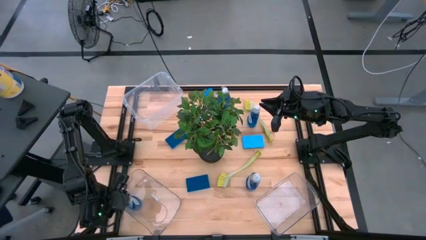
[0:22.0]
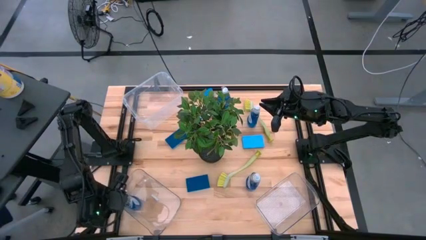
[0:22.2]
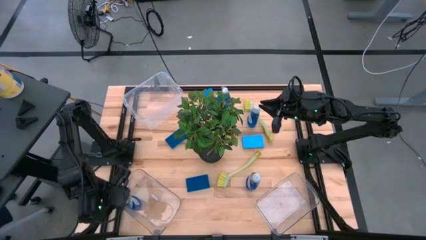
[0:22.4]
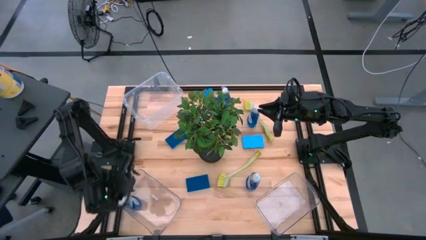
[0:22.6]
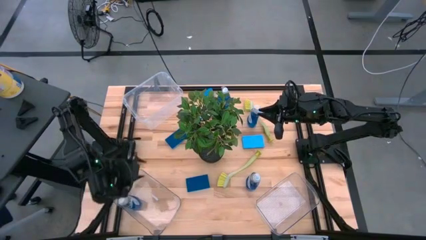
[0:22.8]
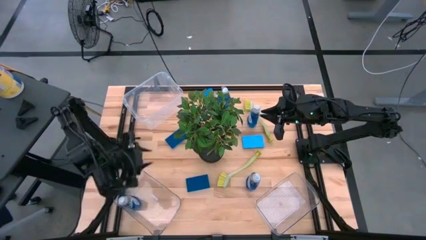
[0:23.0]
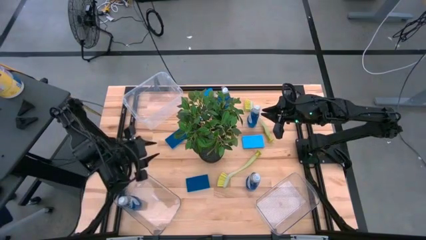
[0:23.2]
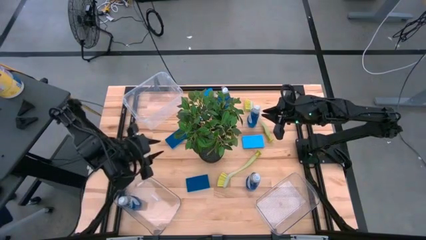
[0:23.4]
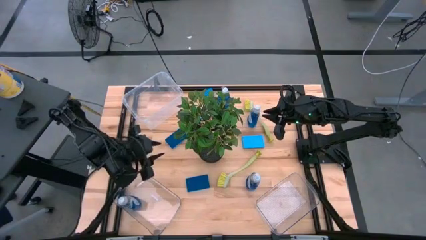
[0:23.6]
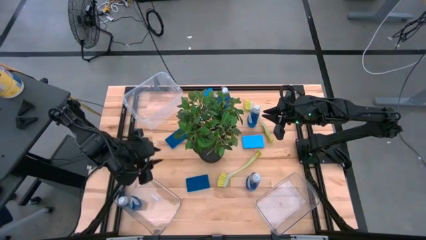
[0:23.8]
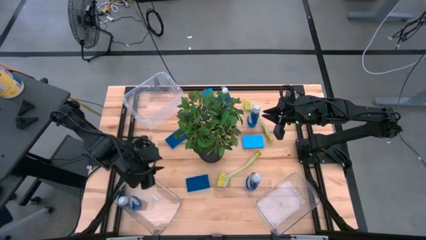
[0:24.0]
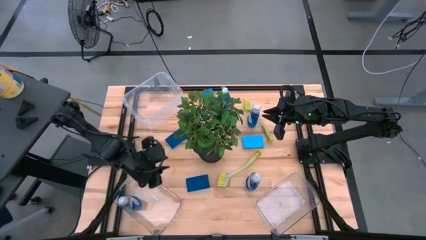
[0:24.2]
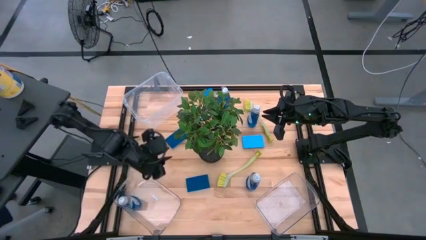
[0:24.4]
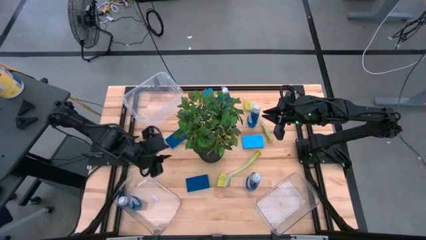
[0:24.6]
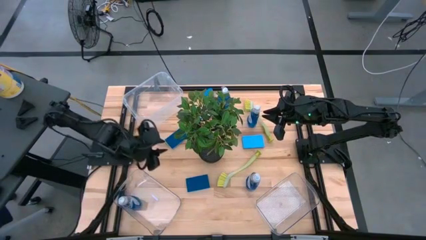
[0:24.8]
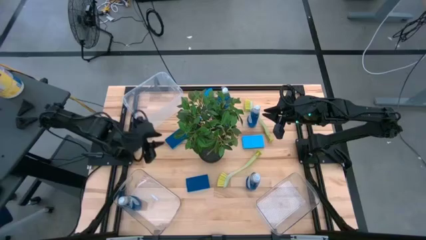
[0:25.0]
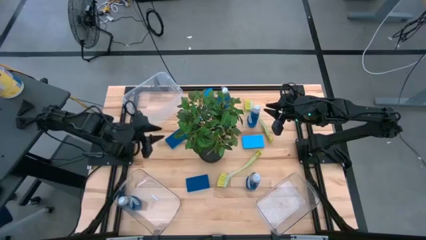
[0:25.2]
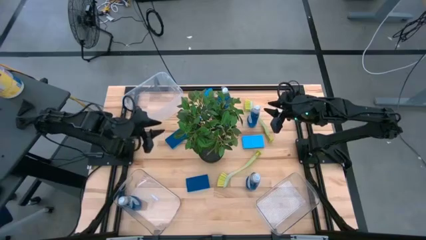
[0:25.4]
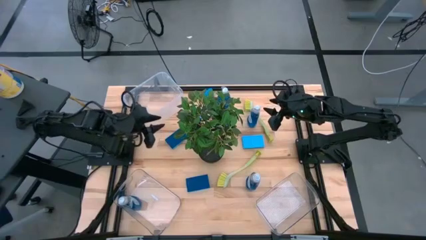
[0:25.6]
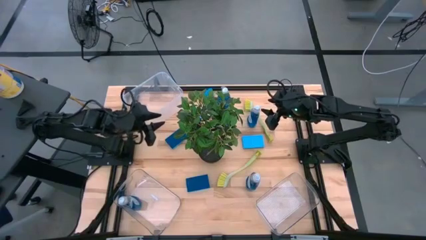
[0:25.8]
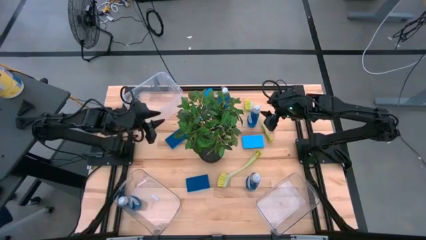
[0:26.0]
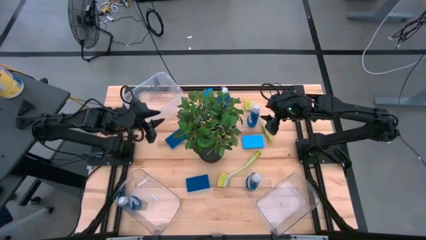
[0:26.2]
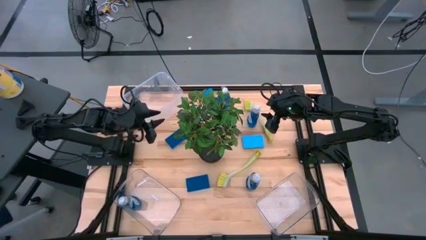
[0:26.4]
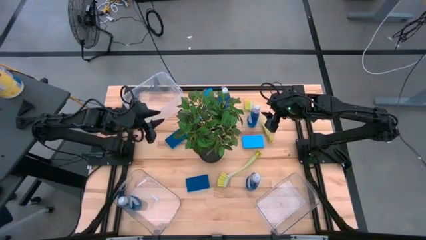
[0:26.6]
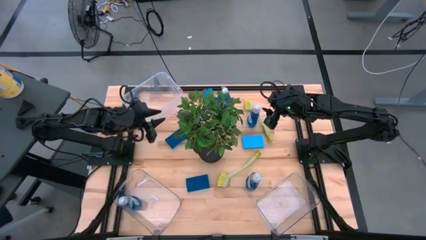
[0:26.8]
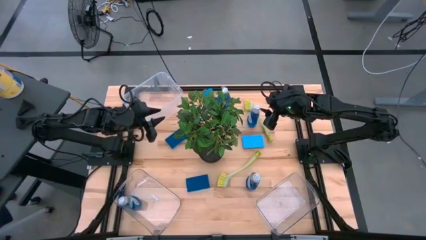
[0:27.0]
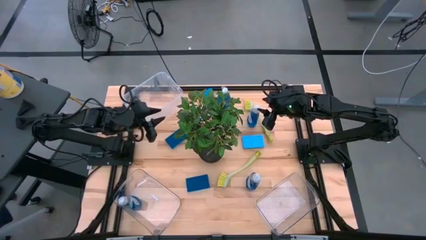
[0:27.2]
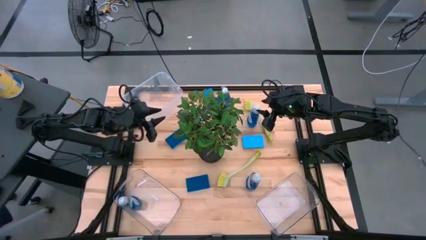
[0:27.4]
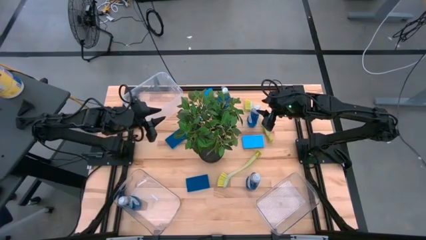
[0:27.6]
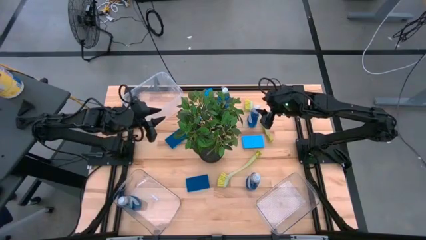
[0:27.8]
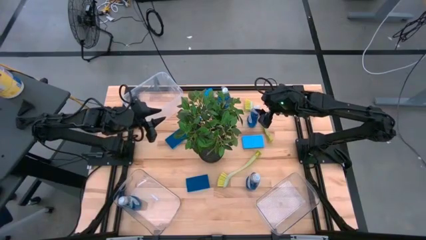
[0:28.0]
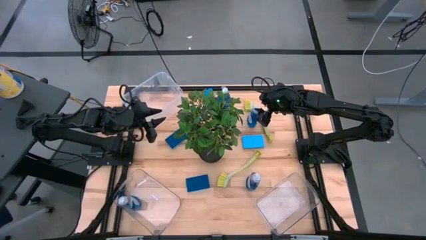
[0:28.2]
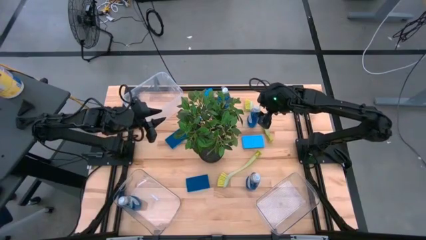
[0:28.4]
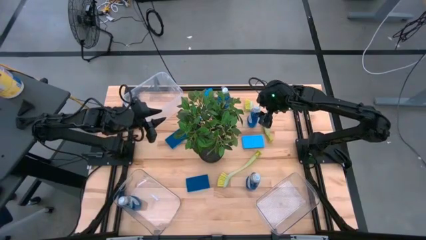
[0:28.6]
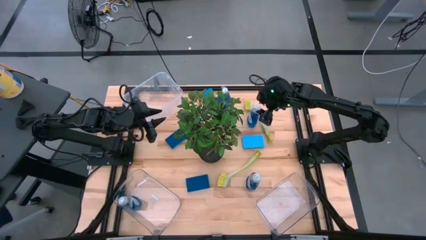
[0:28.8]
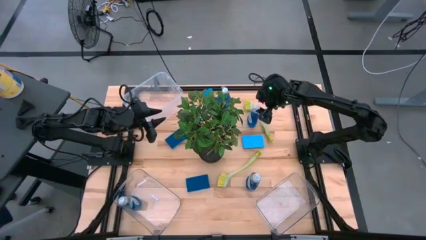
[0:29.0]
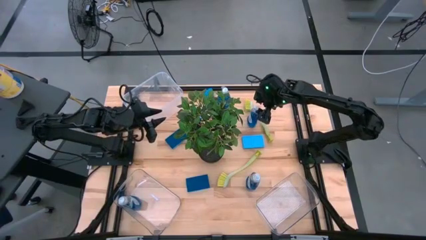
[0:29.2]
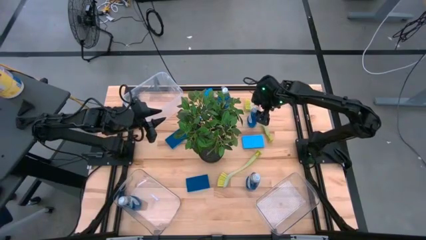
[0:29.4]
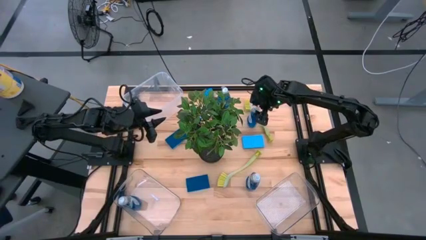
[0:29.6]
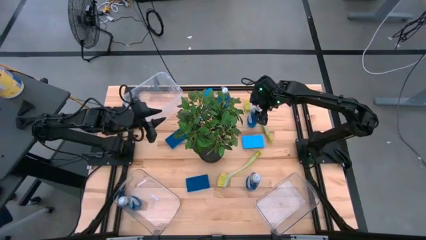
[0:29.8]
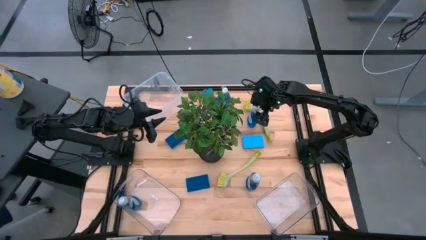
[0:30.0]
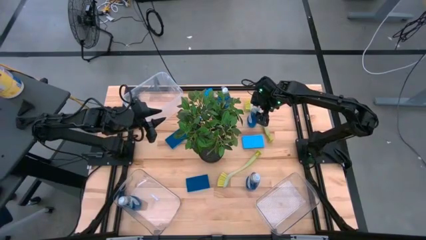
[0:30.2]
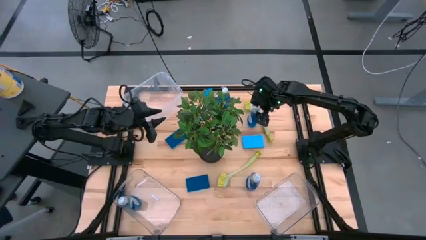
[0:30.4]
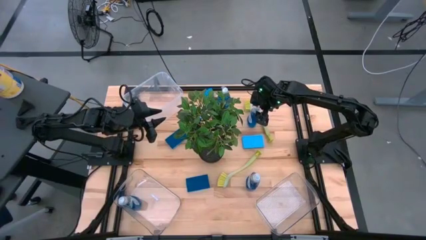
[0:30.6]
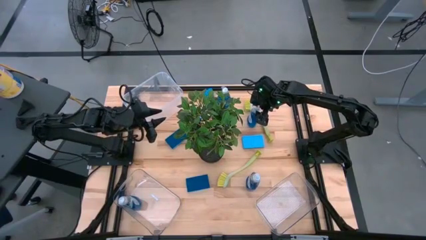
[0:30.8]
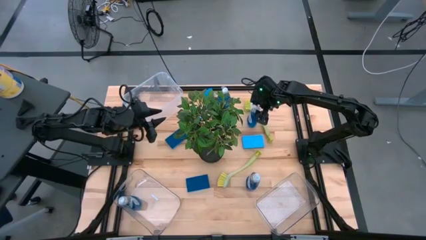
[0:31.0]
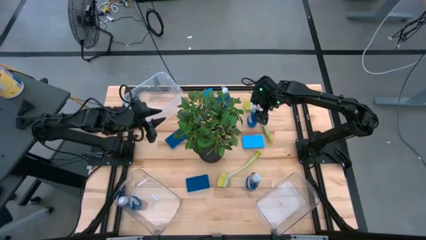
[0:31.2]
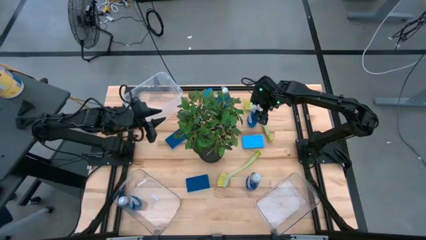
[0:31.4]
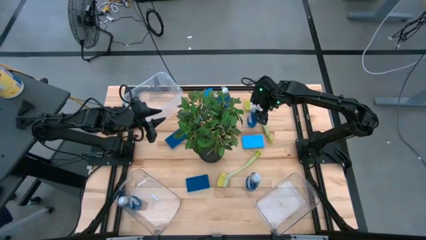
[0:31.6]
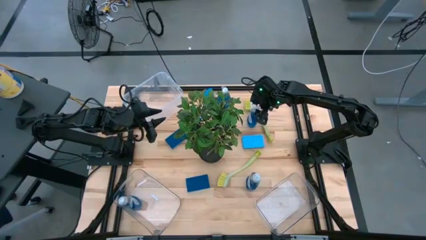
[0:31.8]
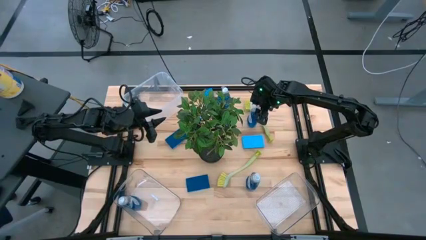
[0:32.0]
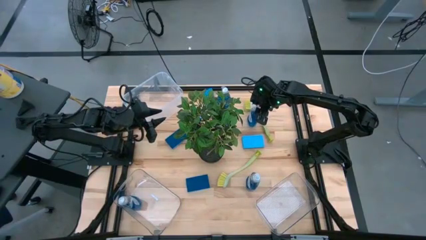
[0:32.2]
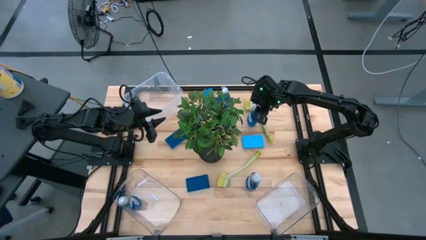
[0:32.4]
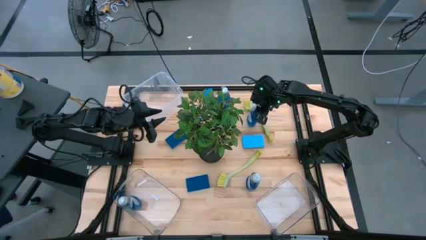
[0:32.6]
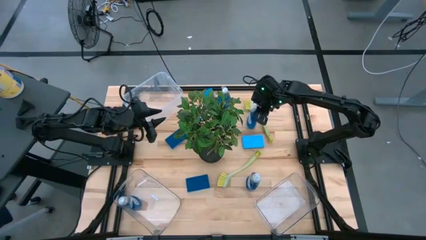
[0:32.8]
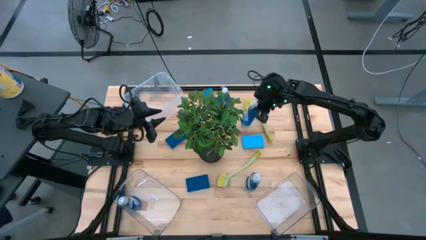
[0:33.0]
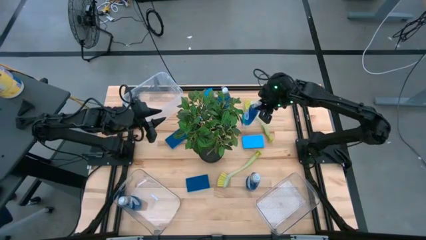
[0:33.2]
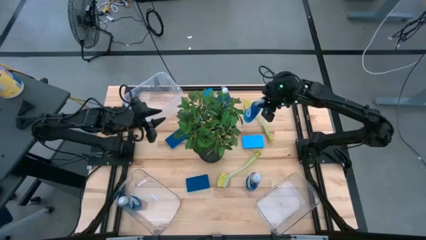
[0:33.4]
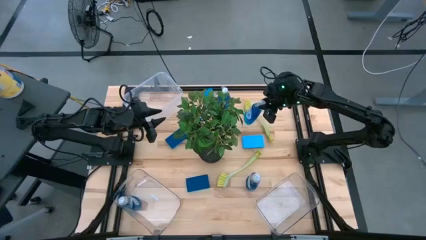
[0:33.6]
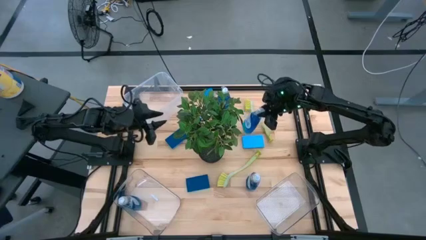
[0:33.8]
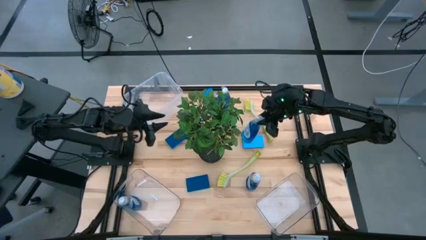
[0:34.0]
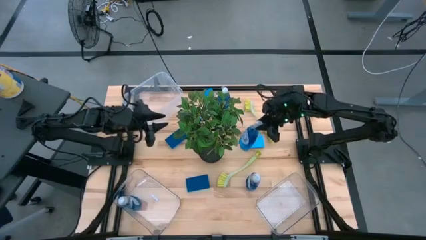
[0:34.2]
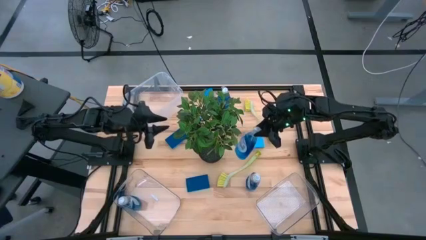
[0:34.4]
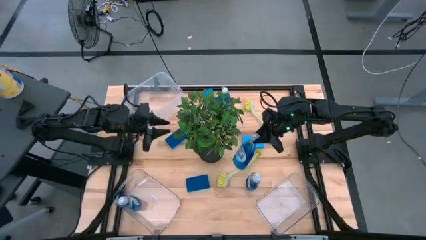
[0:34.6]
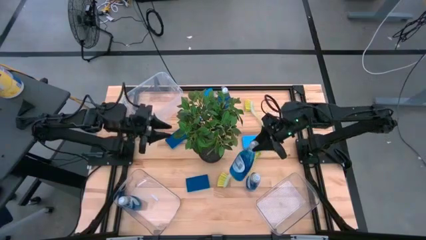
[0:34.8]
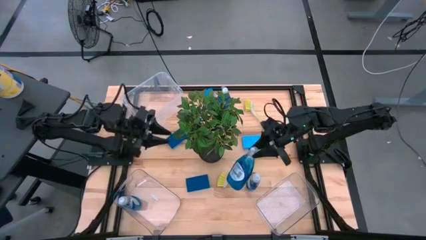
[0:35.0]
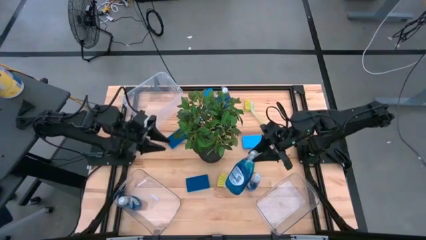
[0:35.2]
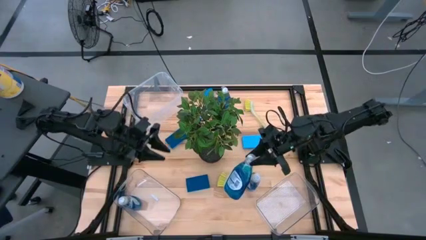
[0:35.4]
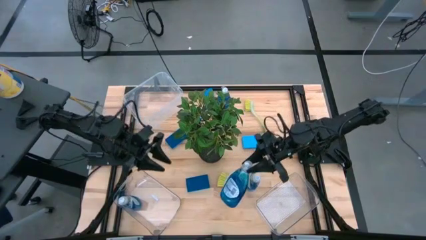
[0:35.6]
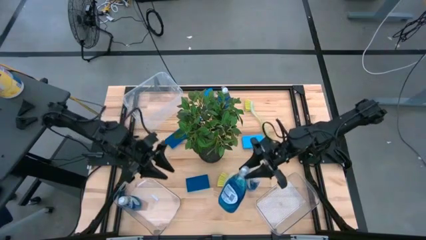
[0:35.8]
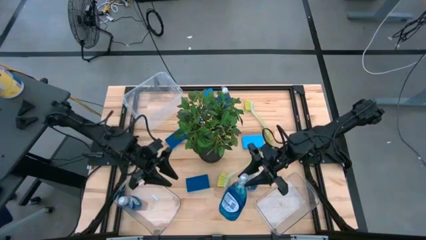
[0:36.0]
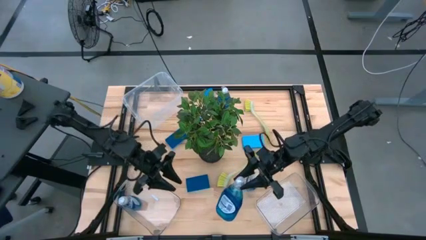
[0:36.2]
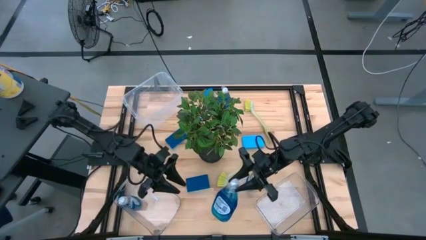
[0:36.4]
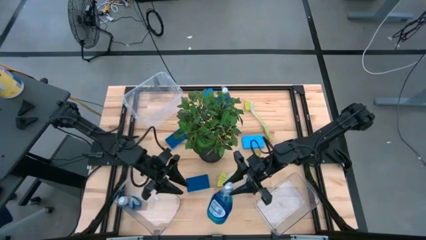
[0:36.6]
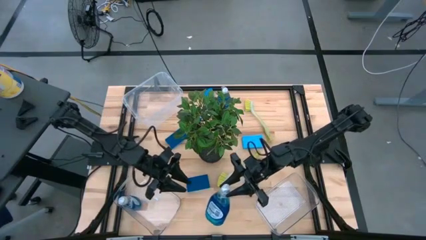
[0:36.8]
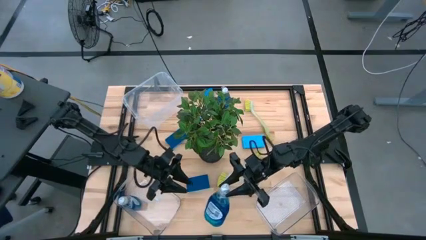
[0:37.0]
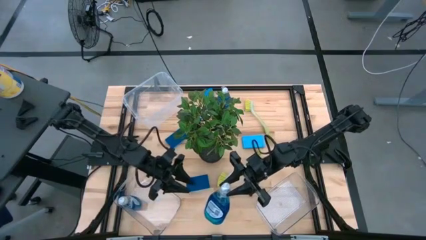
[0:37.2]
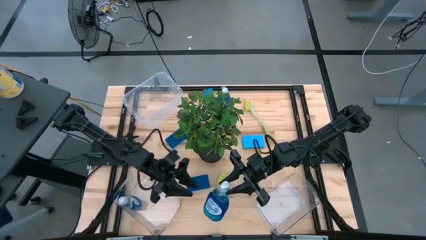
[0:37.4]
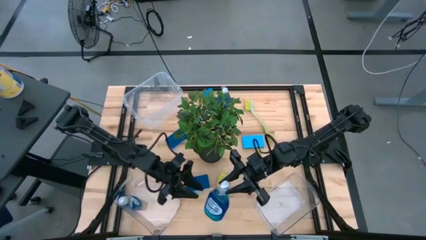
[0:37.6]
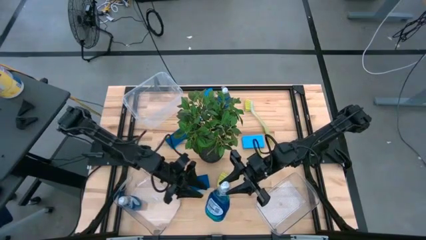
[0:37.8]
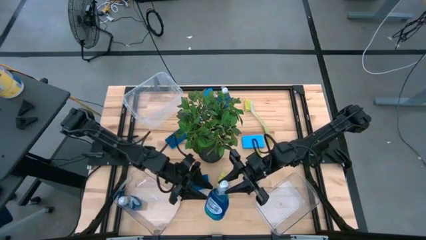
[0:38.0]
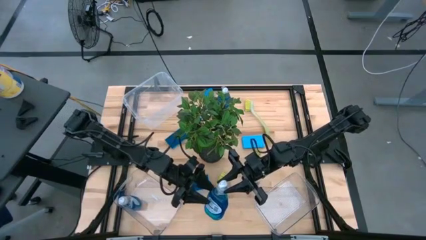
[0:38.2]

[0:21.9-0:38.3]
Task: Pick & Place Kitchen Sink Supplies
Put the blue liquid soap bottle into the bottom left transparent bin
